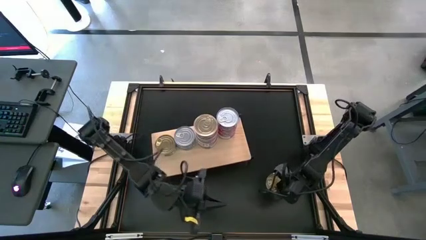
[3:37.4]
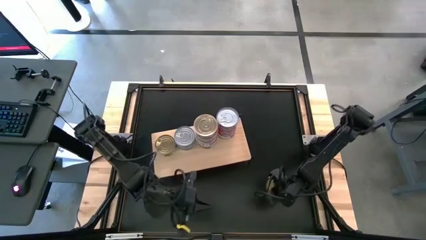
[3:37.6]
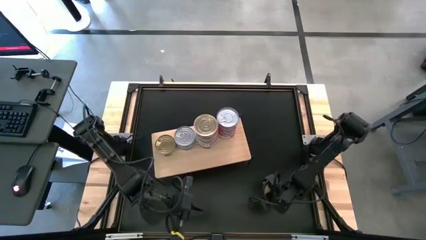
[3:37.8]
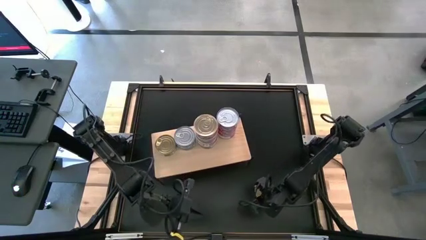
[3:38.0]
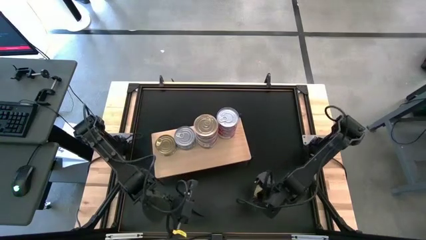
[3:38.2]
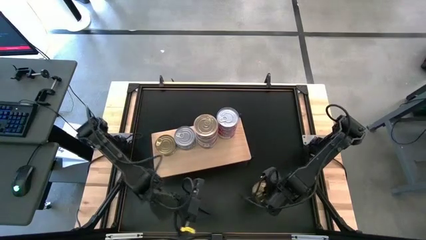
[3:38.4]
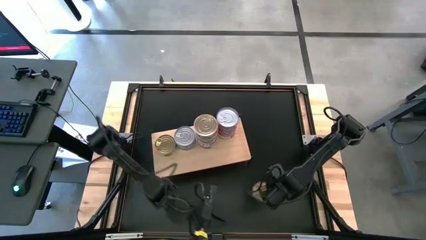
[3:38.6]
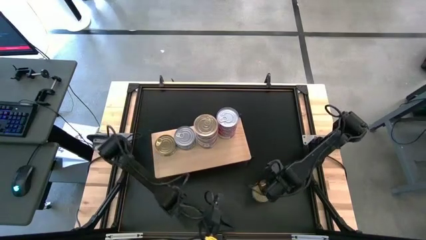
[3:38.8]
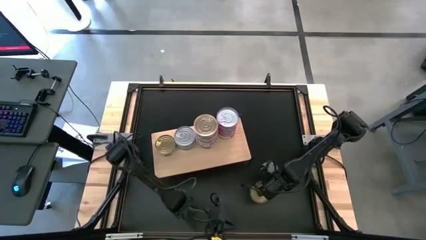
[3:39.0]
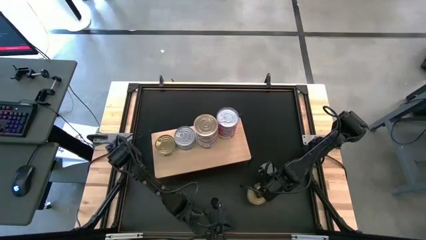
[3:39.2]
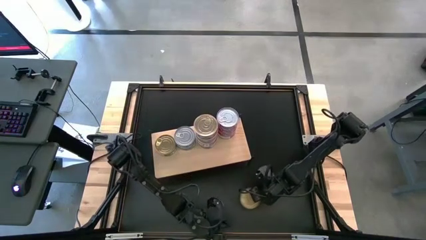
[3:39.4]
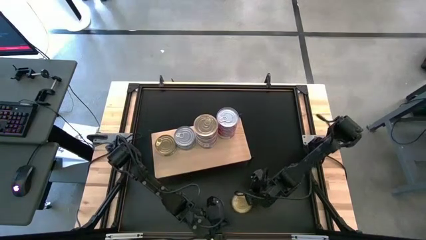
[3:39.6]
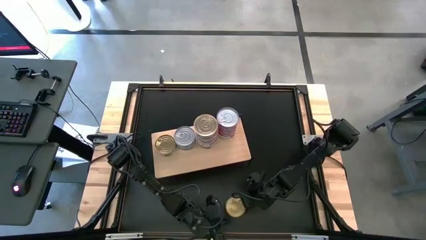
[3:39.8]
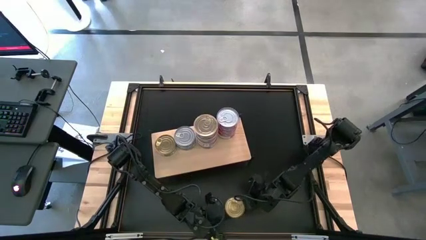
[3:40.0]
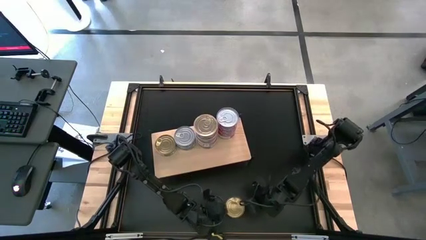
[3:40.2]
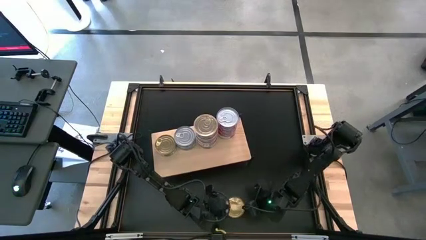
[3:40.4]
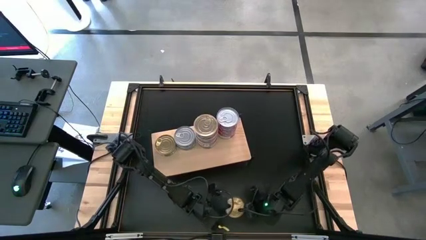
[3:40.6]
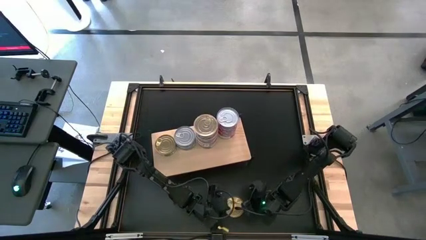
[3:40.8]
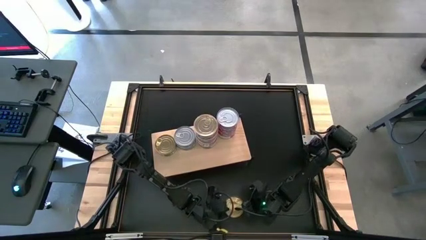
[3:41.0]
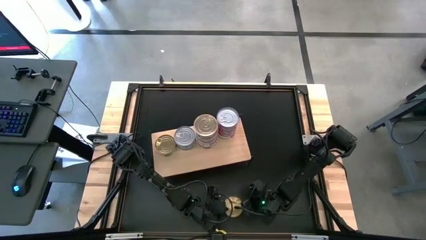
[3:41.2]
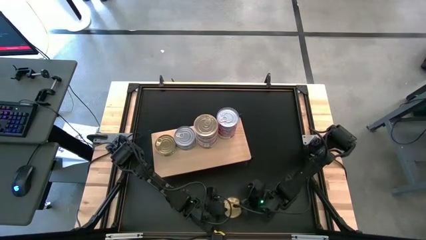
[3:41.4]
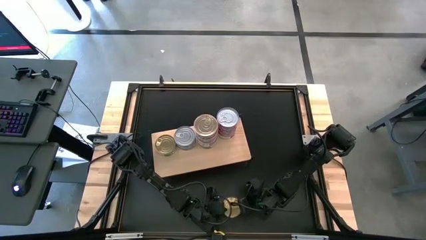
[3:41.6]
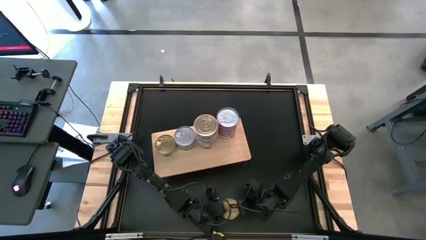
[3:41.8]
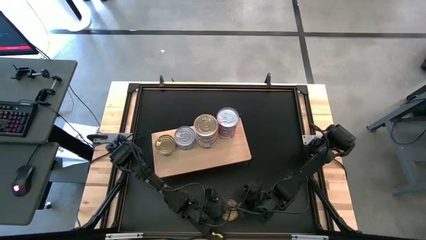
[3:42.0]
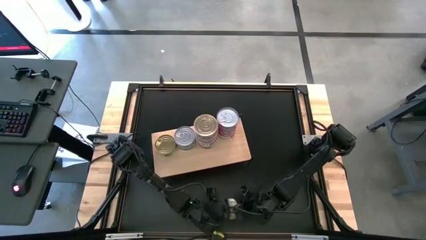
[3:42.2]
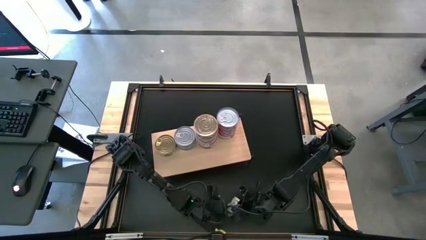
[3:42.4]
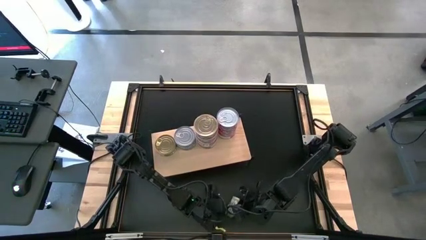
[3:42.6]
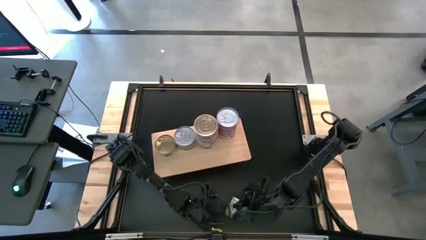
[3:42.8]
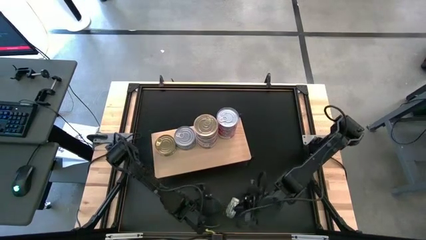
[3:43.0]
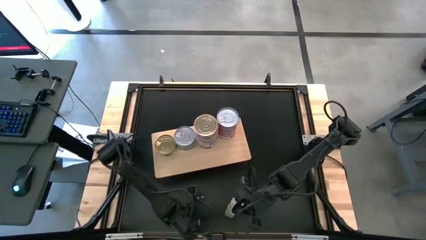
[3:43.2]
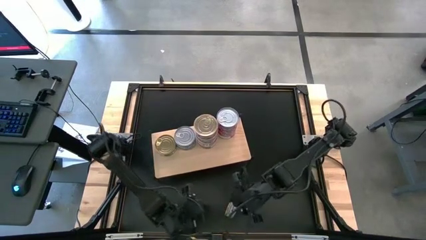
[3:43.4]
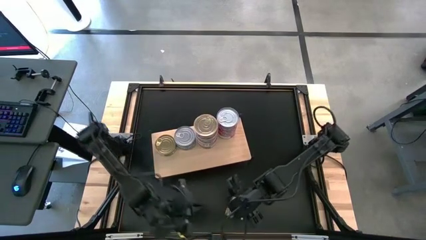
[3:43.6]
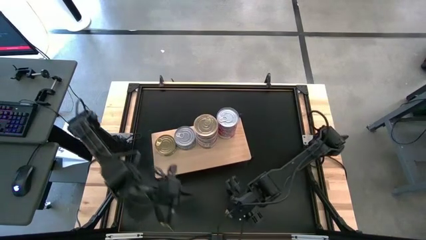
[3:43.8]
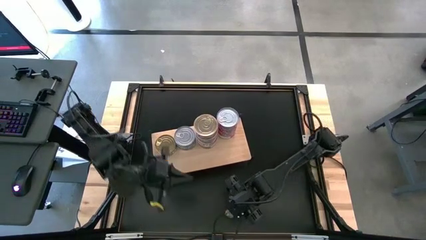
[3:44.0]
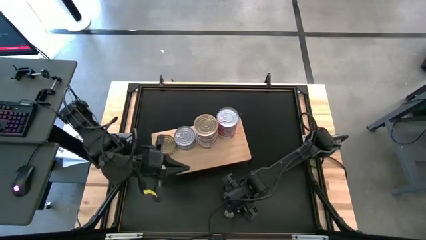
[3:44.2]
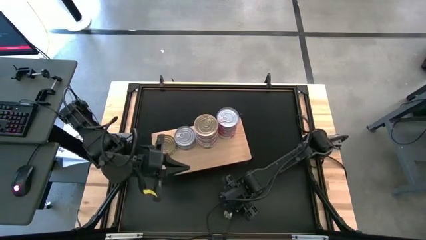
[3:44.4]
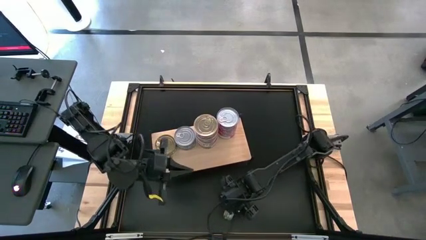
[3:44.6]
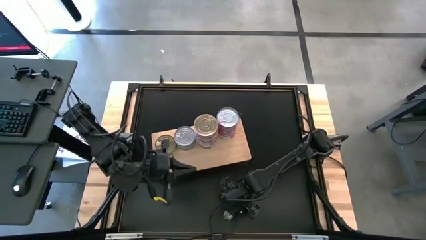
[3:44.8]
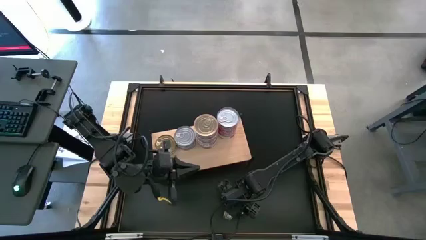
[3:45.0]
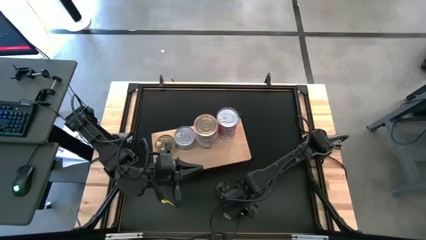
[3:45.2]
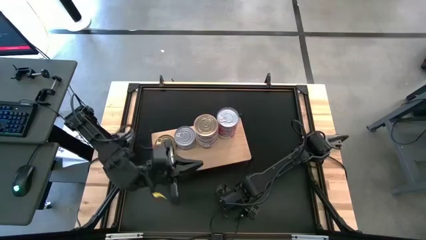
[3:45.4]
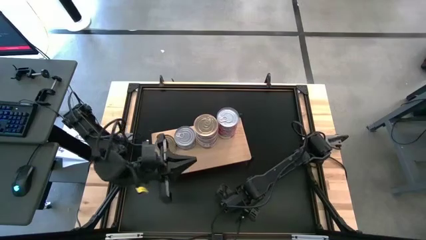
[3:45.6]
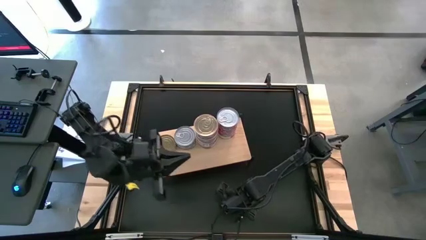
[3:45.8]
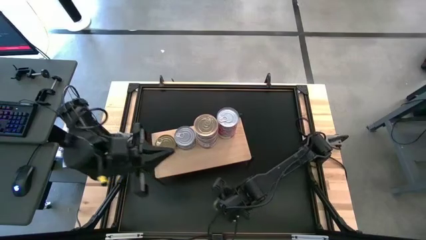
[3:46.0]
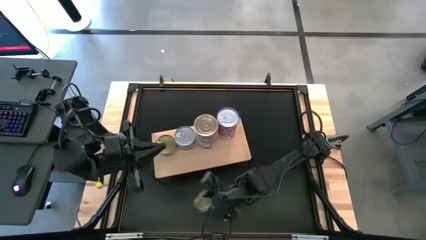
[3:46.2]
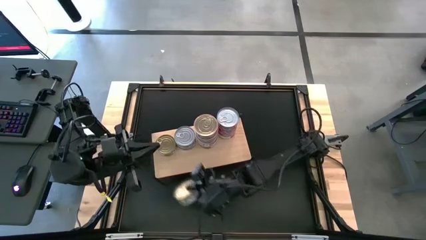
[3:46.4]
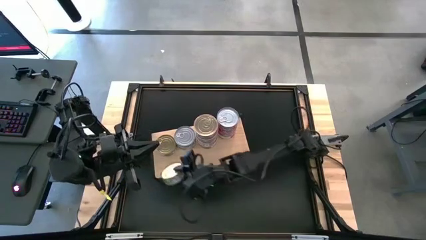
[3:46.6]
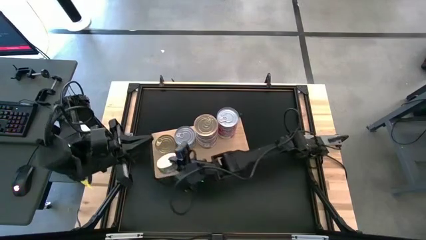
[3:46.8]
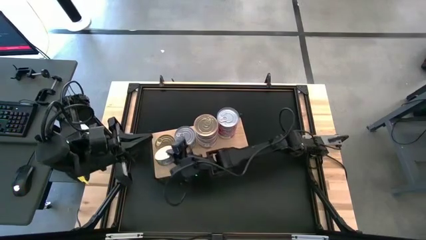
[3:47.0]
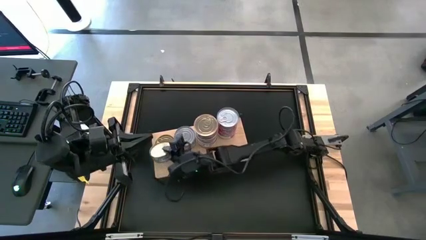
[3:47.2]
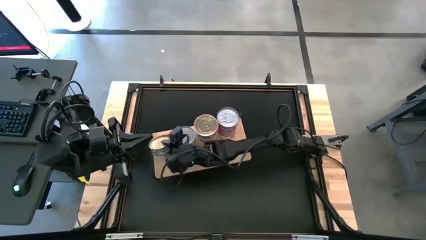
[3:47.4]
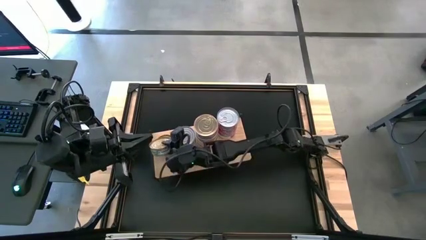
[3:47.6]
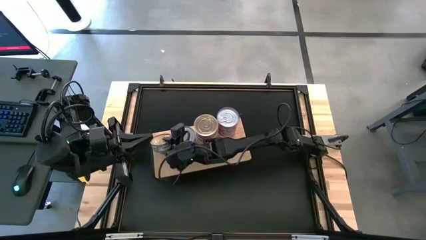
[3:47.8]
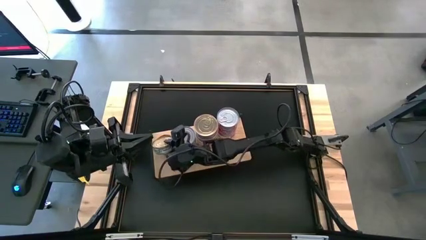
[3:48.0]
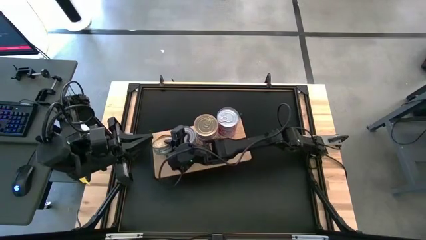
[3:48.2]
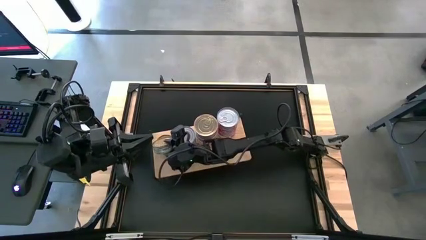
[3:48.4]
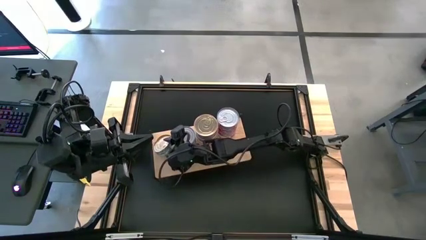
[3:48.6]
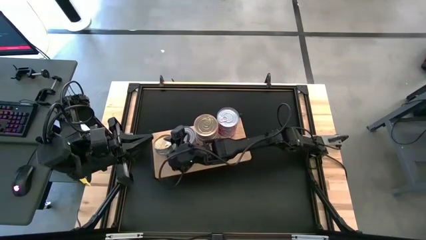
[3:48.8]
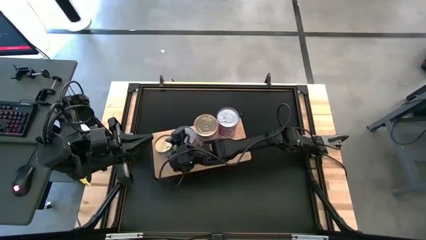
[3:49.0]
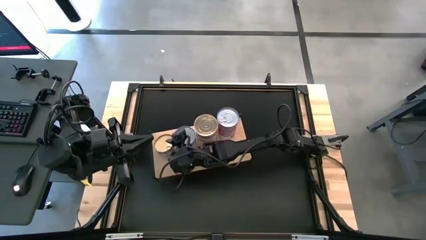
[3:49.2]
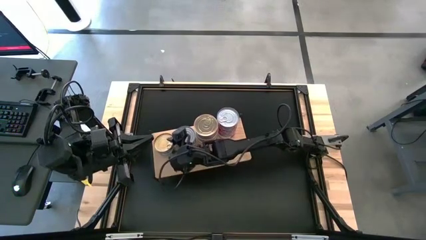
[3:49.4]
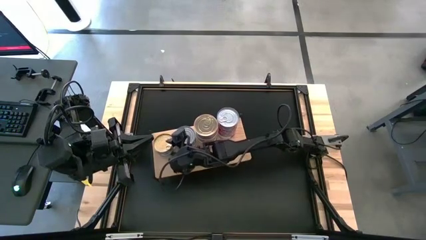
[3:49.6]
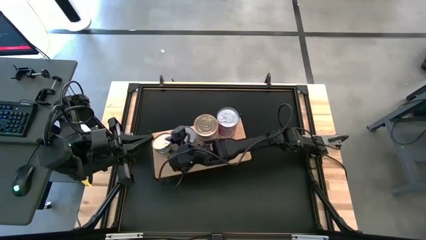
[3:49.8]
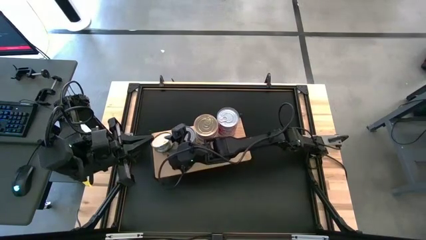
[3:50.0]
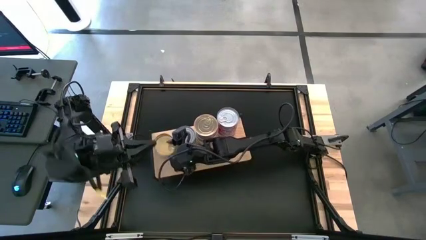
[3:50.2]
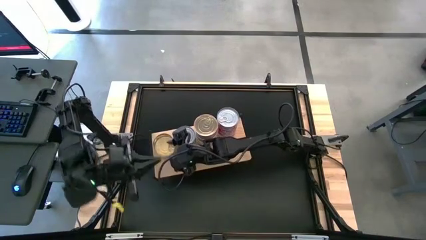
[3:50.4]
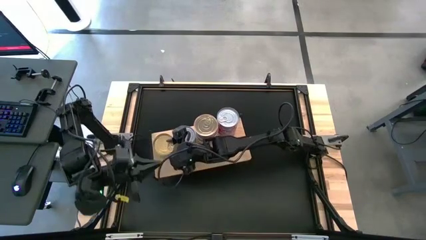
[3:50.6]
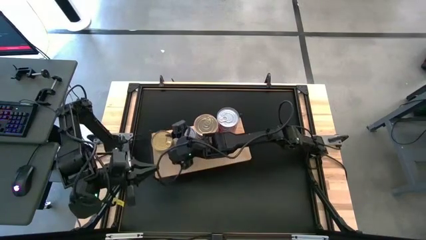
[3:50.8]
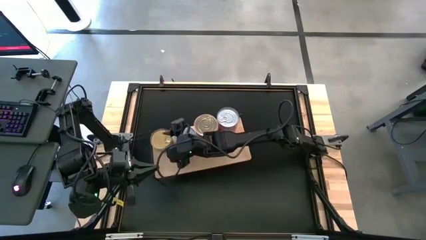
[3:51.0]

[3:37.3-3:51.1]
Task: Stack canned seafood by type on shelf
Stack the green can on the top of the other green tuna can on the shelf

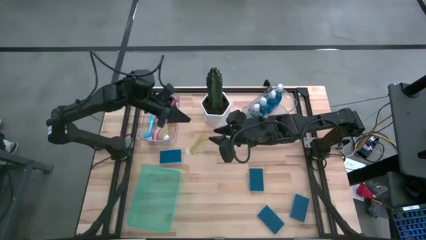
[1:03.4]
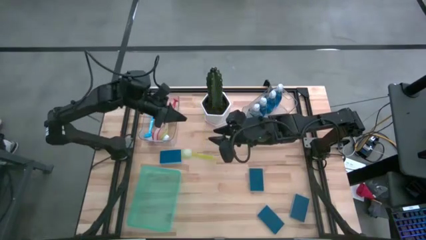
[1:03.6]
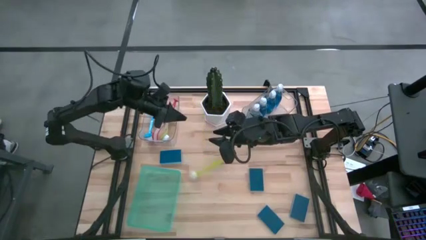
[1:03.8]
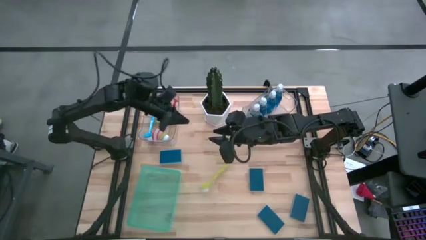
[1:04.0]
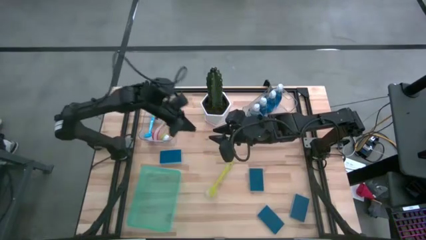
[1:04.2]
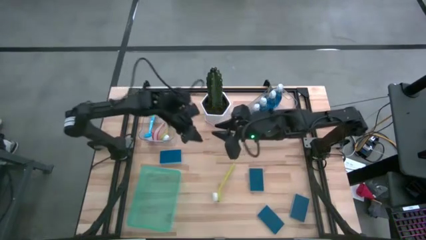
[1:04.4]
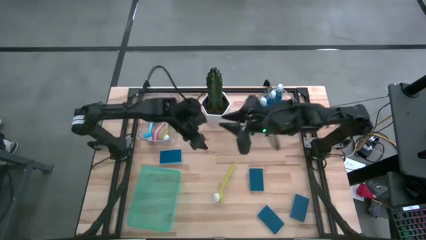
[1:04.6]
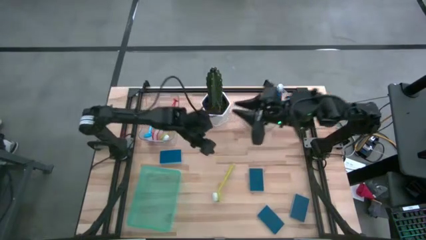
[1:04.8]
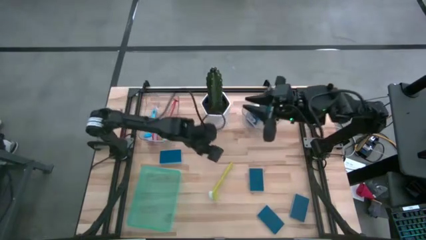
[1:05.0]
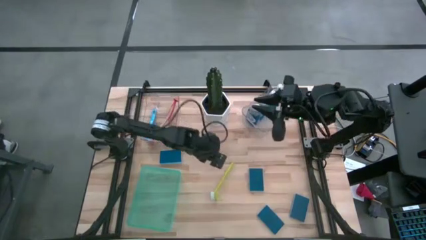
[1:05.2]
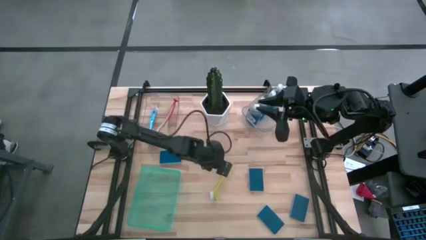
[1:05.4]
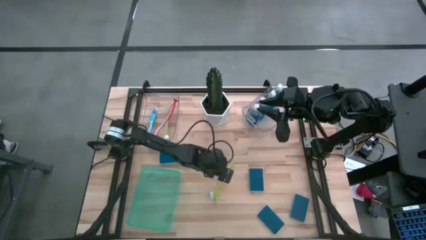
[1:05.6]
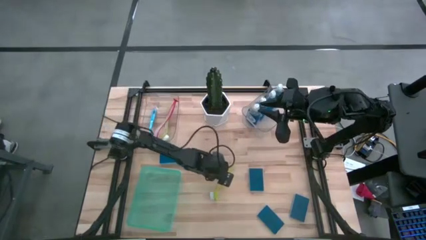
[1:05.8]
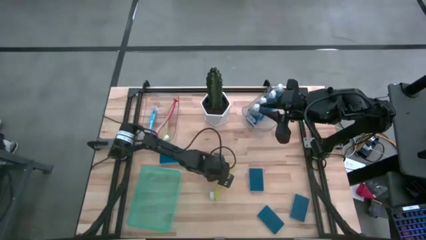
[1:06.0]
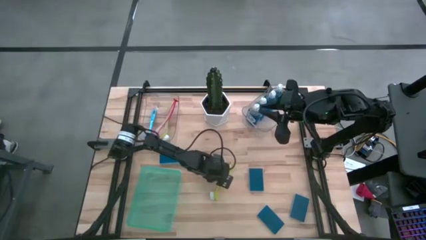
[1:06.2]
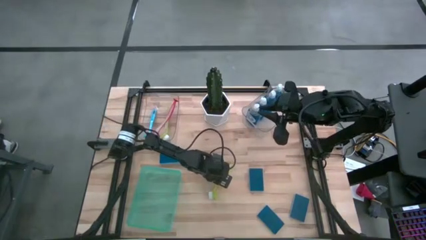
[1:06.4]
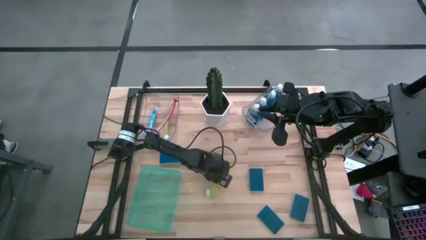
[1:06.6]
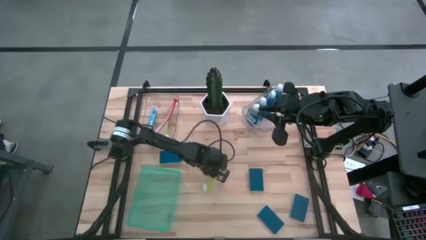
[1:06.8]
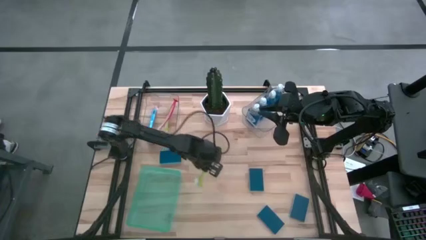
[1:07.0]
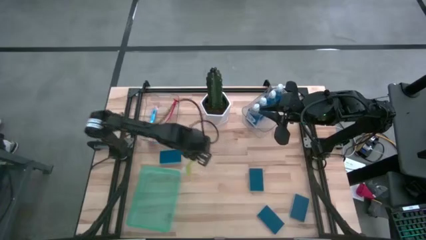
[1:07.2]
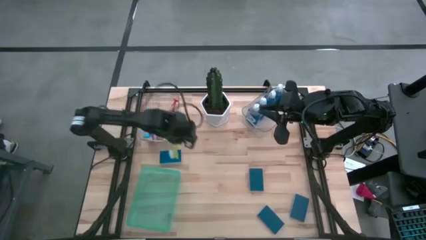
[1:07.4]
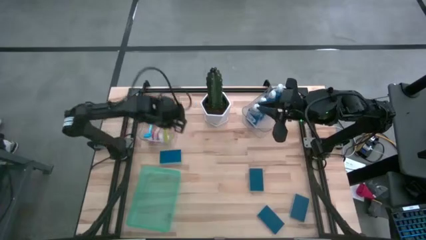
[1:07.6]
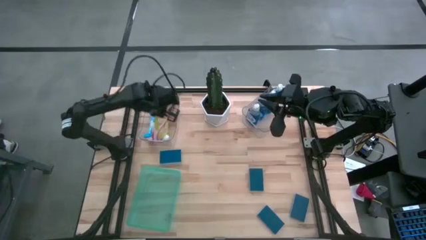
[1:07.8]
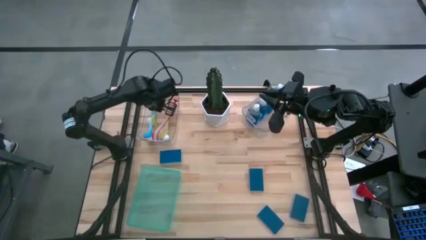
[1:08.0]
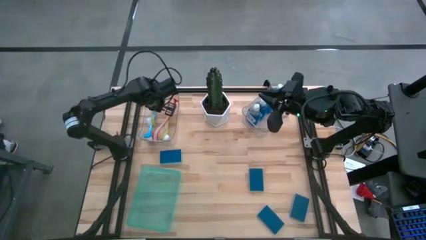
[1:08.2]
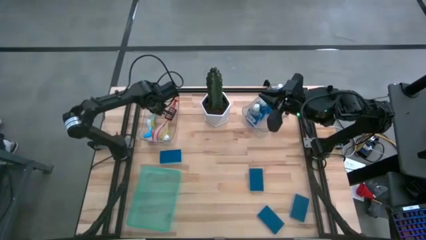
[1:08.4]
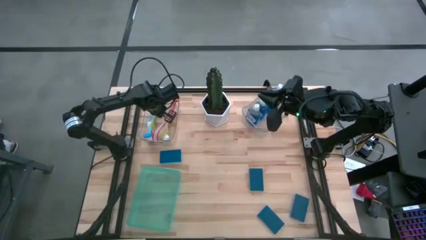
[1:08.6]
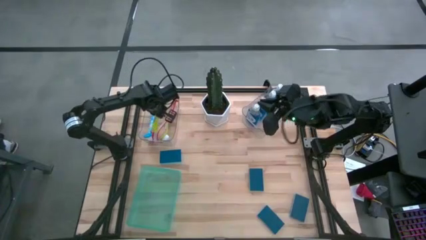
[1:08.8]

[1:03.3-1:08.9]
Task: Pick & Place Kitchen Sink Supplies
Put the green dish brush into the left transparent bin
